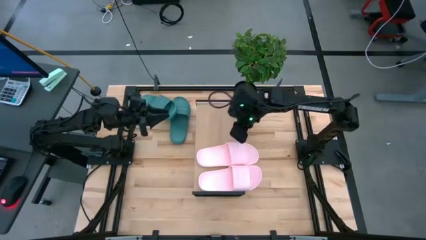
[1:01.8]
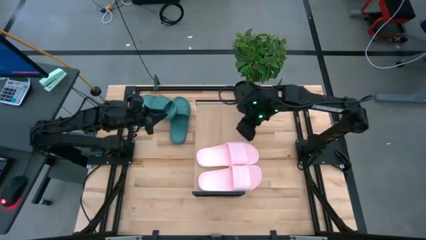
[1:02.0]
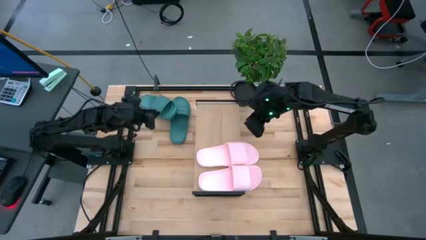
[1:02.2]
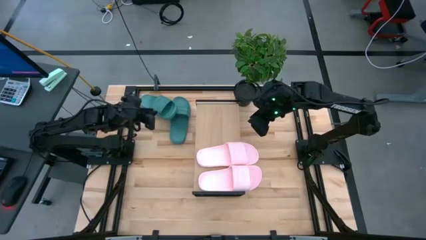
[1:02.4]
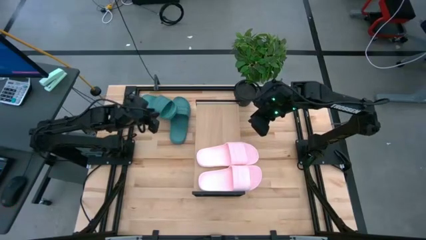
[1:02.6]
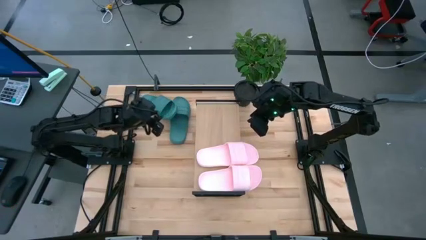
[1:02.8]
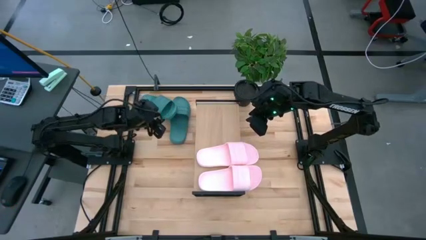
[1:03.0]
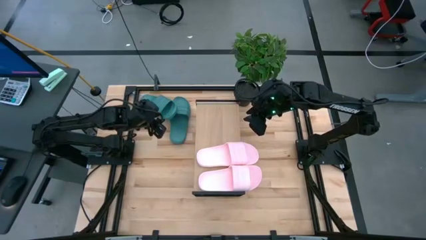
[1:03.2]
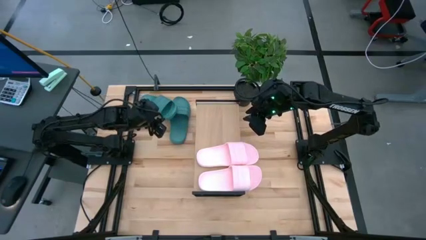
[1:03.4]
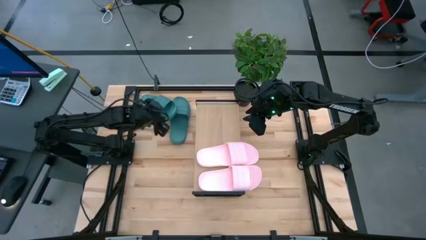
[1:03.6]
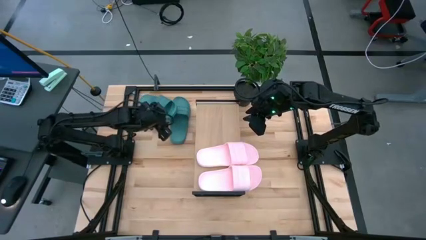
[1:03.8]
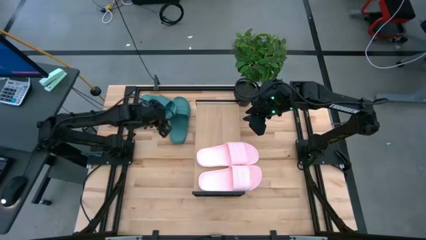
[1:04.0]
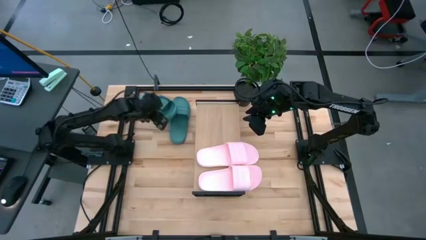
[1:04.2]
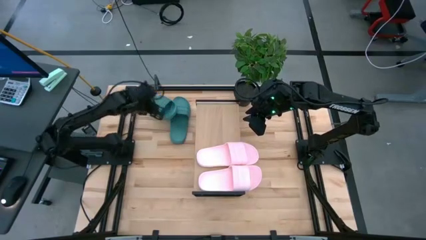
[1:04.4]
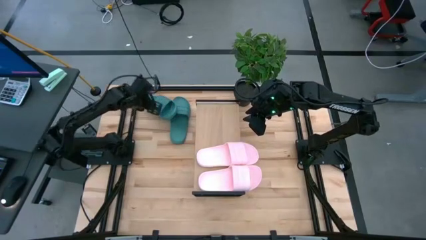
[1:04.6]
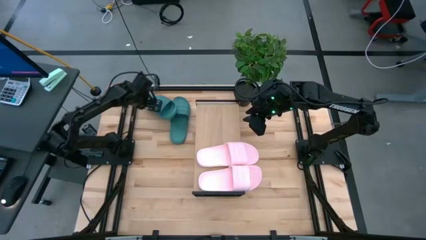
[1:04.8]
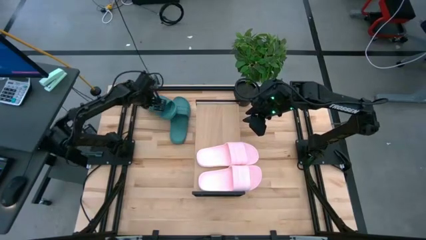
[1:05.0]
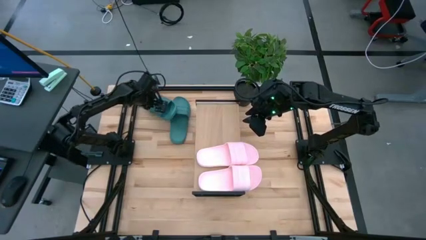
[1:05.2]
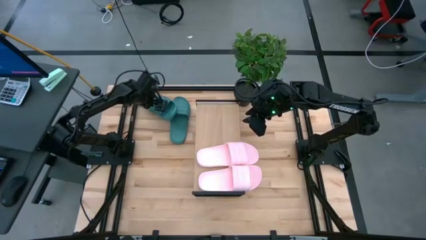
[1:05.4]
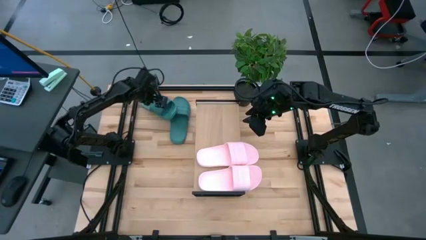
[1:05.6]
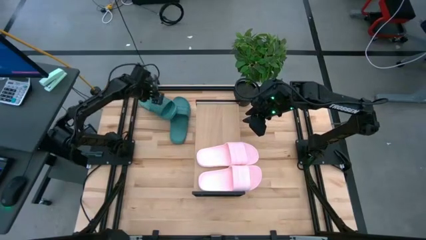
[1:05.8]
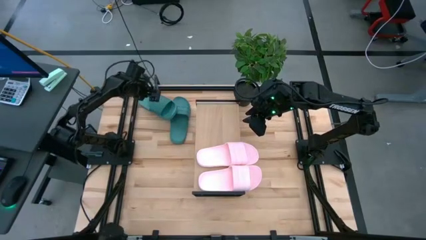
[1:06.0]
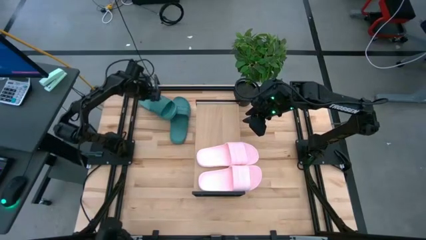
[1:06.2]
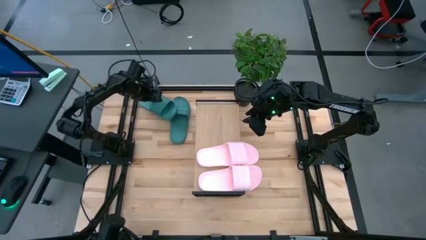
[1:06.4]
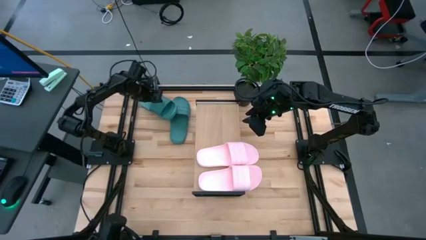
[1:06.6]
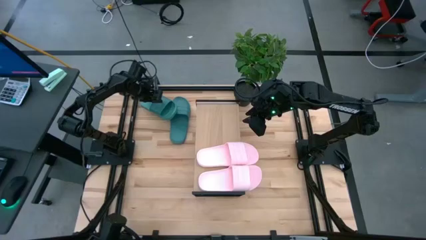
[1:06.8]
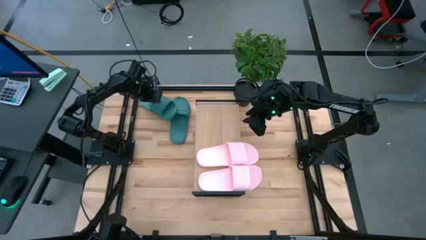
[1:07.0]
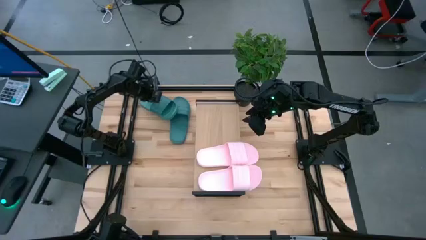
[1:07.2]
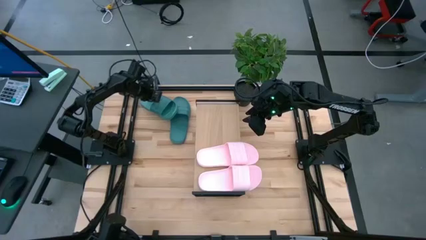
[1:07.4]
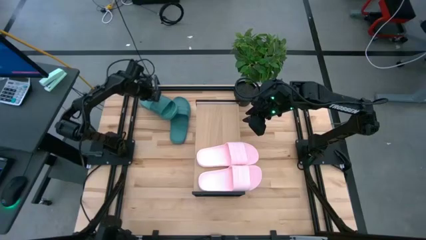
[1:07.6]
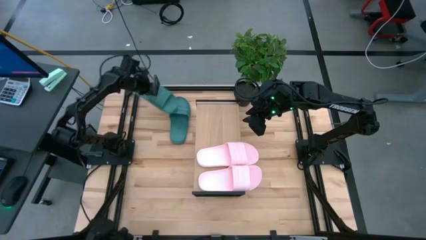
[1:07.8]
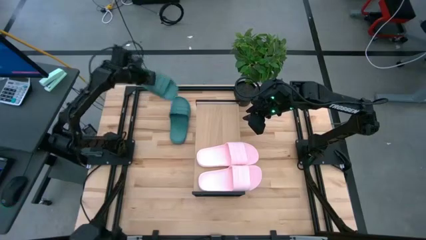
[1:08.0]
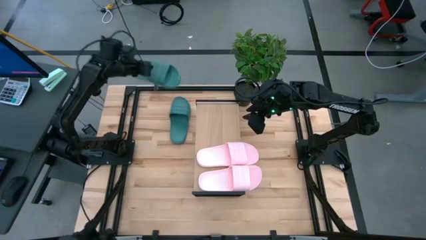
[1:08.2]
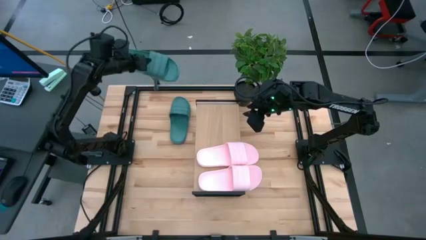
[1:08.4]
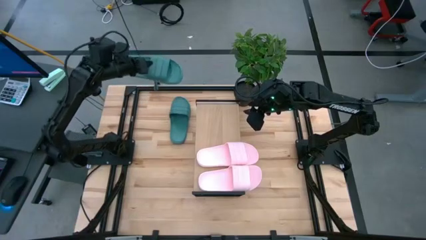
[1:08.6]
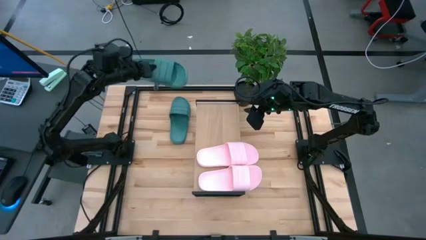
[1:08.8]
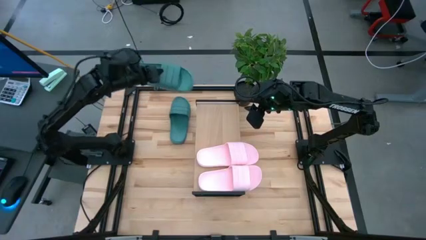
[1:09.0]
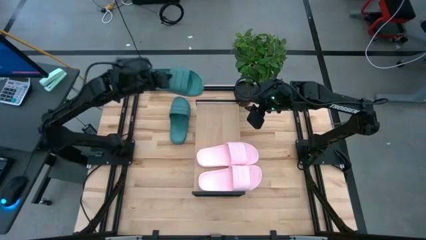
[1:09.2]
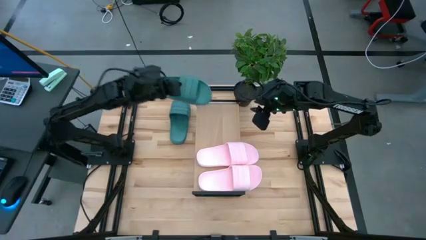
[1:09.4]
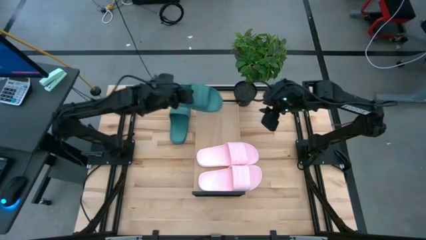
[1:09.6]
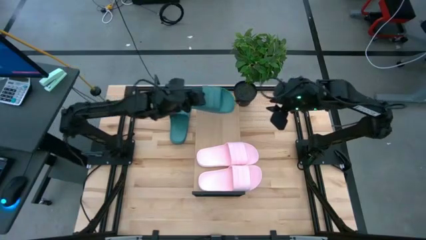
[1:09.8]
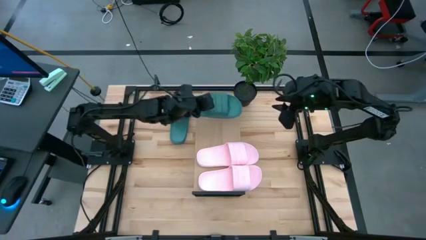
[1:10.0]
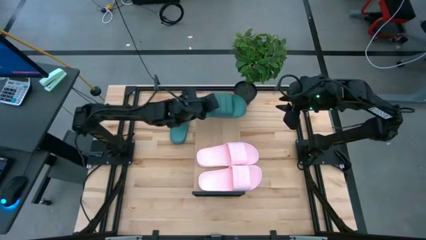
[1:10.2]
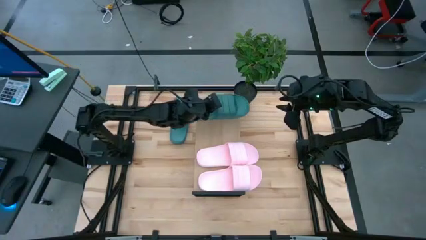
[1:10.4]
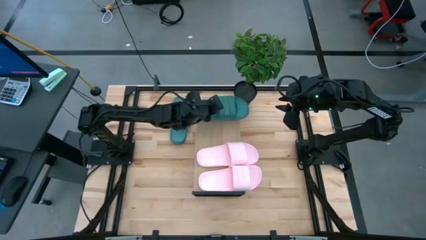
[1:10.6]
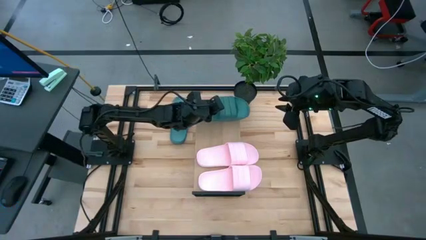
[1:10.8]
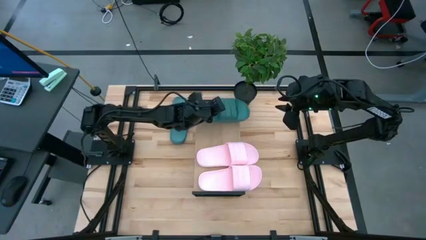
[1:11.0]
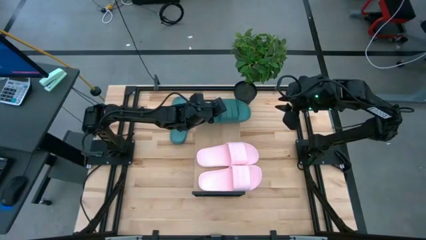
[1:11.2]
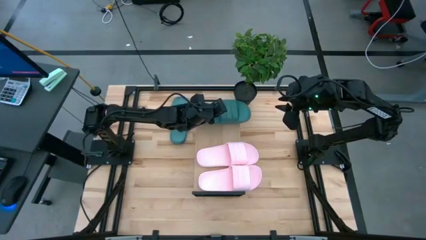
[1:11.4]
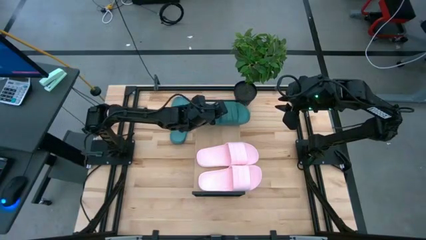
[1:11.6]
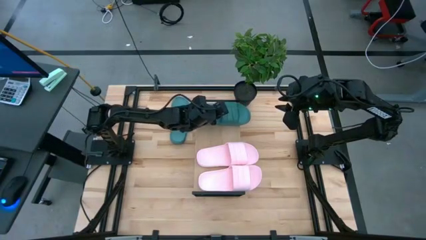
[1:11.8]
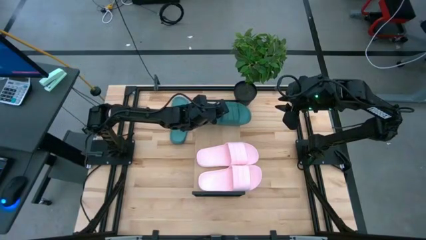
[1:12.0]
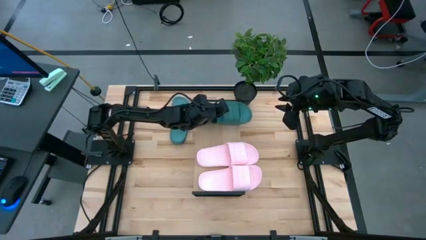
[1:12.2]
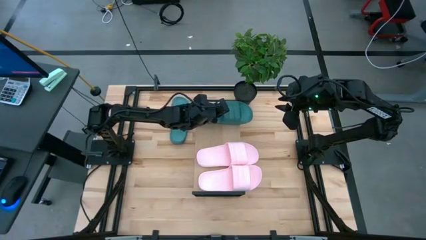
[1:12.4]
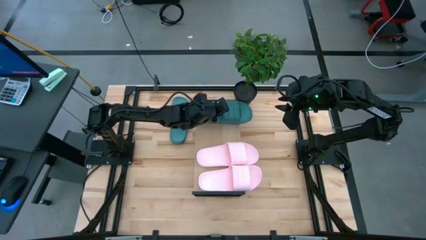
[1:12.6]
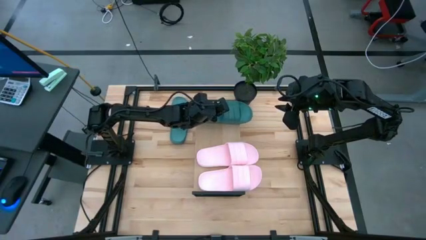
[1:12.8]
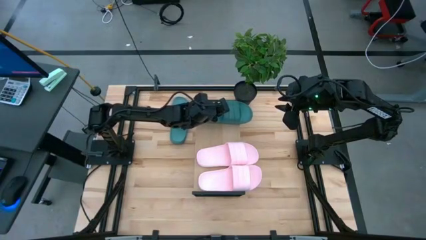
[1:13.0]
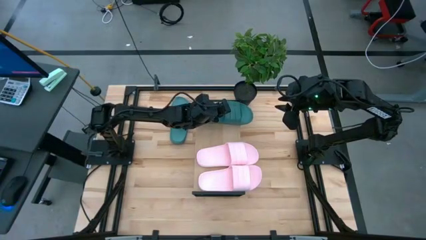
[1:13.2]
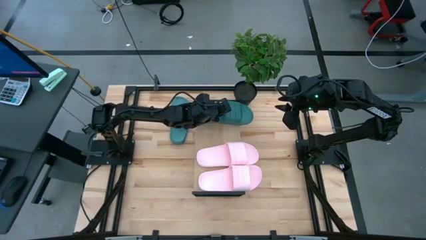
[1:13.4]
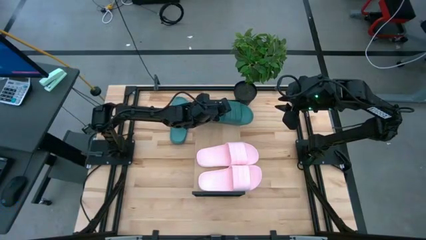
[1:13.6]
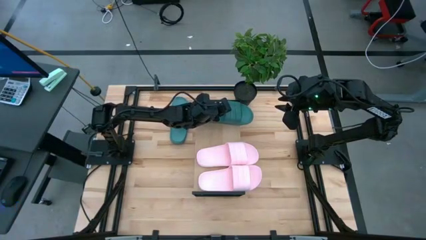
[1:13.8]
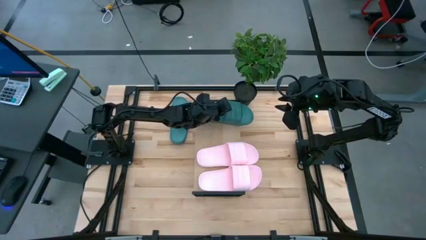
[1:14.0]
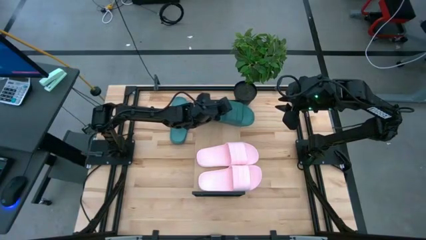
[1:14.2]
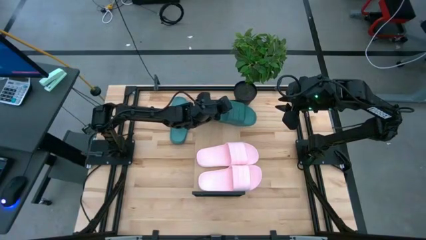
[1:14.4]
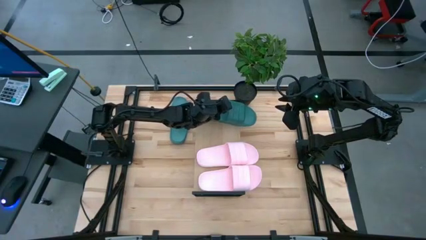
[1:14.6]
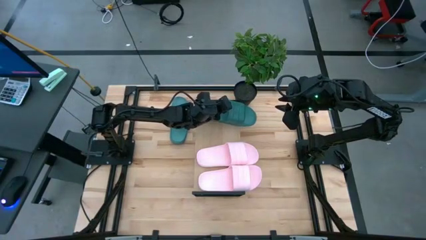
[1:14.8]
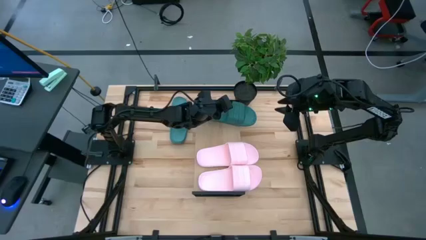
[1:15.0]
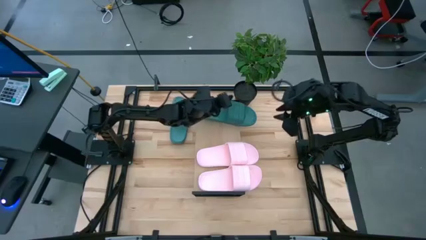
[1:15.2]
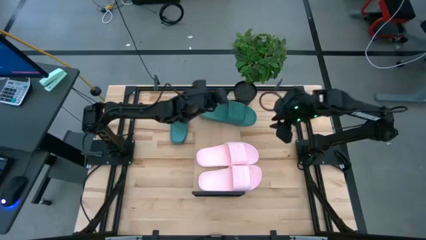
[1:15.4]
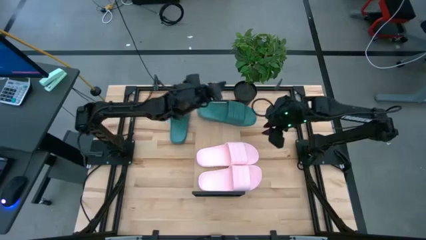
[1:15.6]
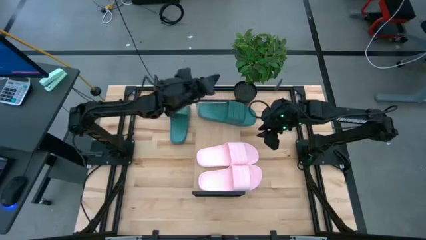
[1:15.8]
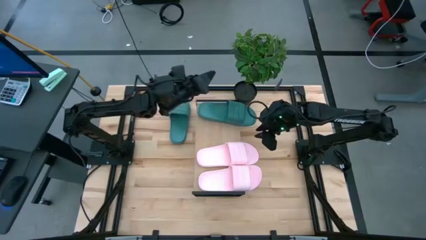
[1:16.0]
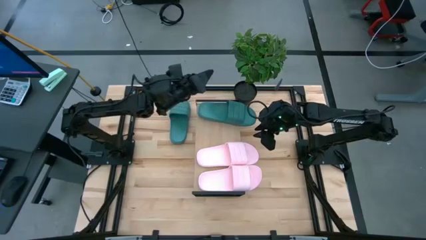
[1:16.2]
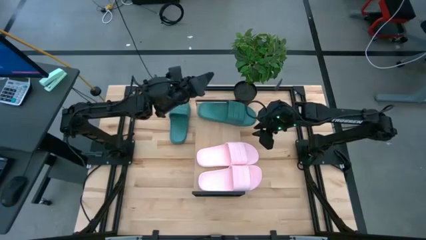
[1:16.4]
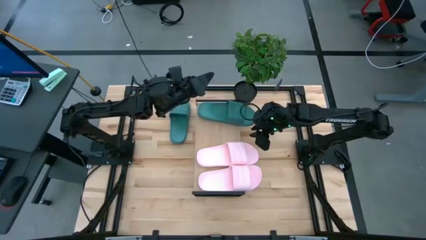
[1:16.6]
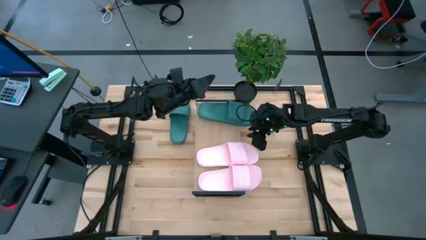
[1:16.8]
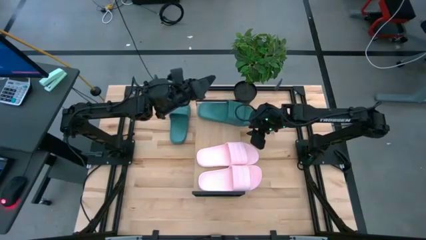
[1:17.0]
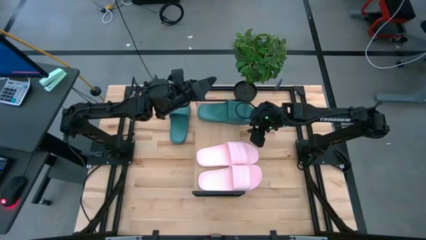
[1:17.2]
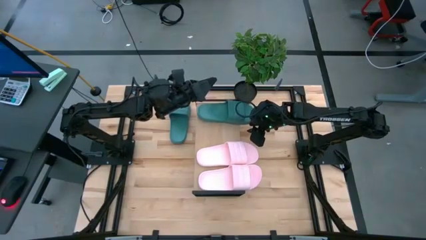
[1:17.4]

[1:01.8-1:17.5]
Task: Pick and place slides into the shelf
Put the left green slide on the shelf
